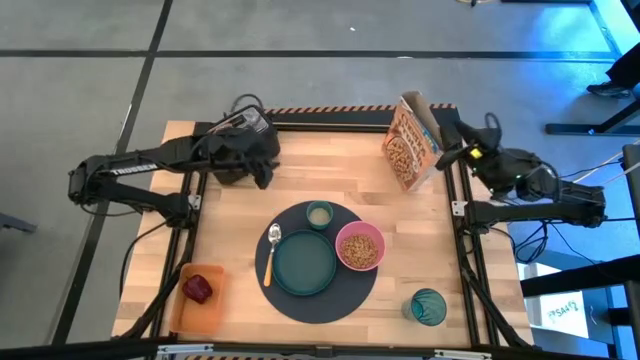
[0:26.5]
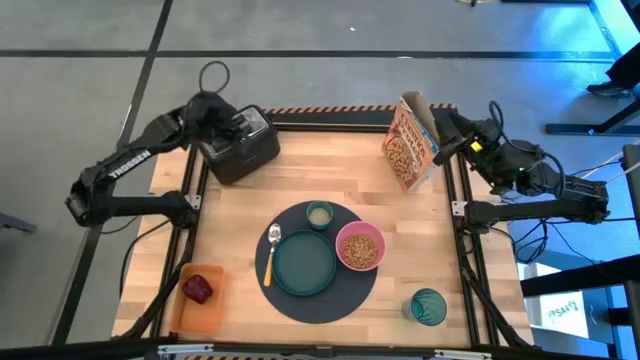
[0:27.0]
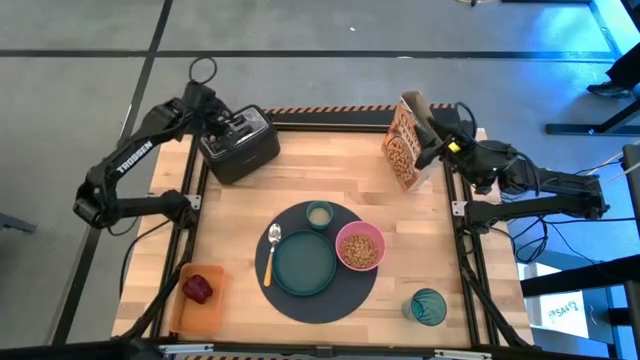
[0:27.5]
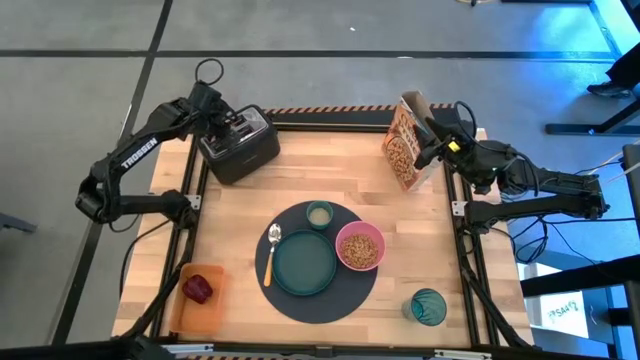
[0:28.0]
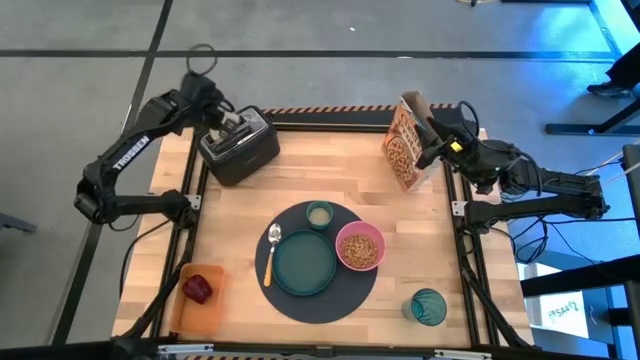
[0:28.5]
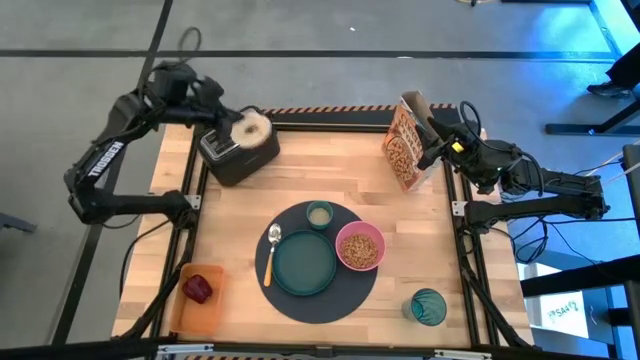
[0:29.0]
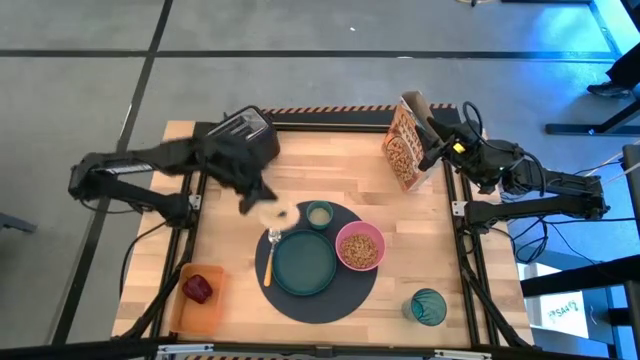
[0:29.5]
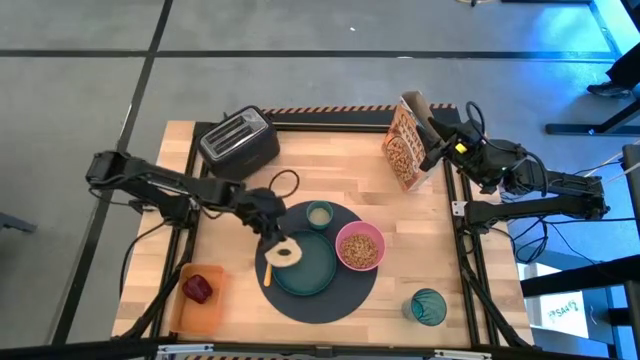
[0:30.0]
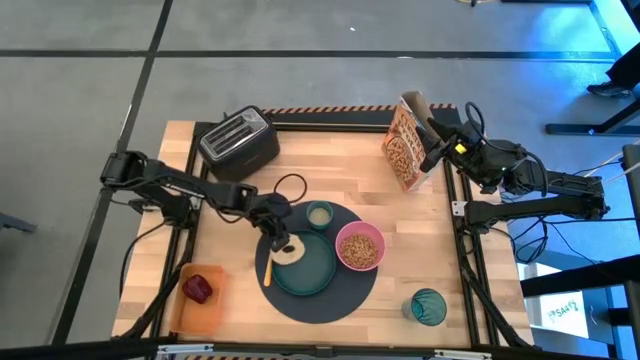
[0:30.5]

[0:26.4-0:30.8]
Task: Arrange a breakfast setting
Put the bagel on the dark green plate

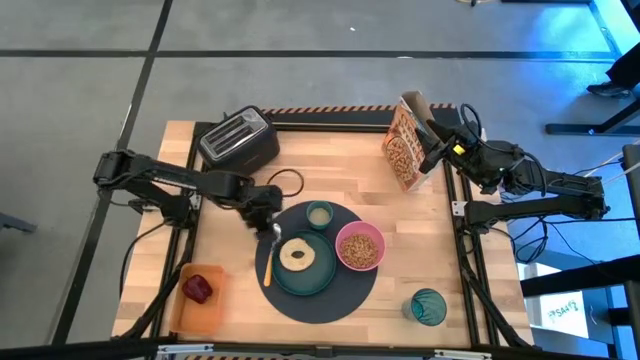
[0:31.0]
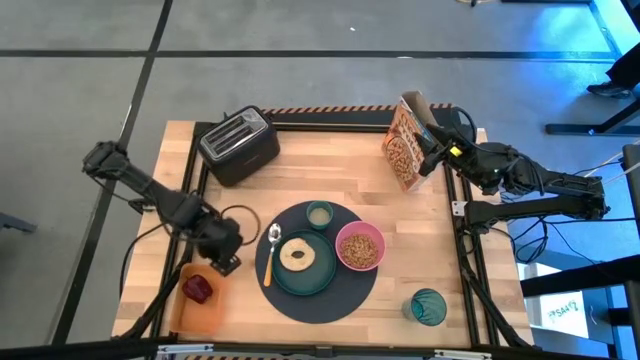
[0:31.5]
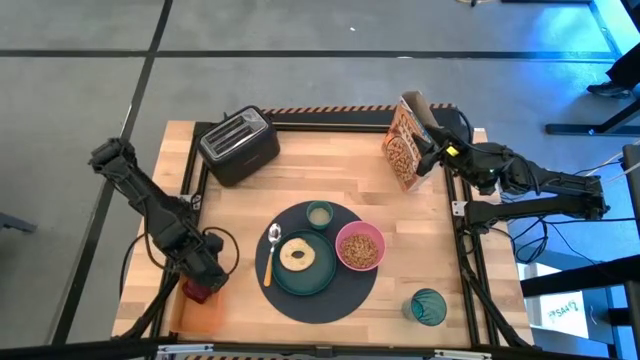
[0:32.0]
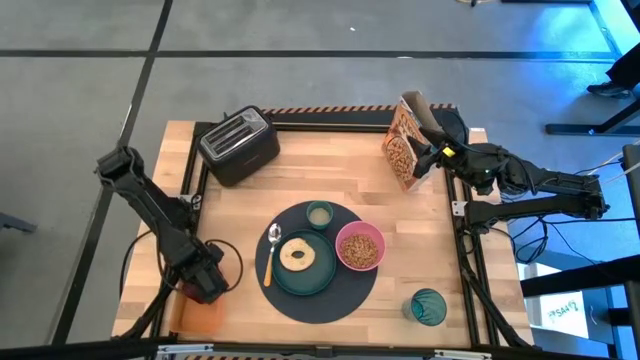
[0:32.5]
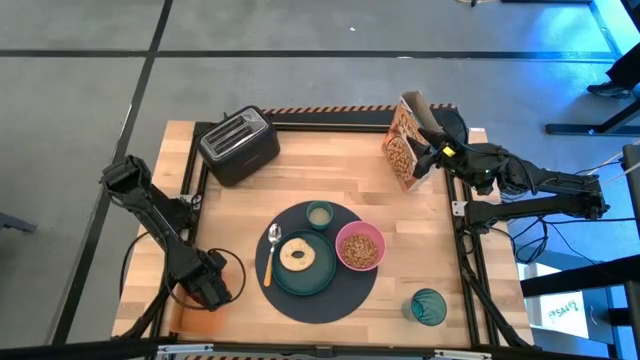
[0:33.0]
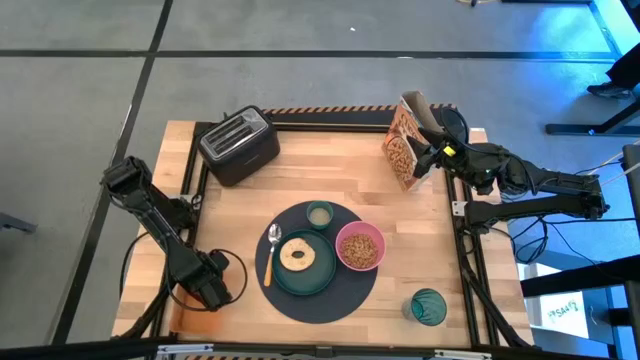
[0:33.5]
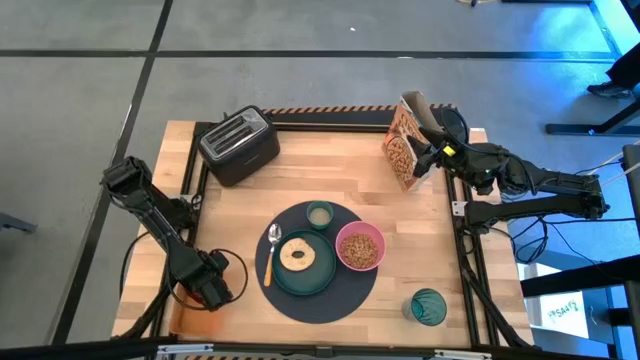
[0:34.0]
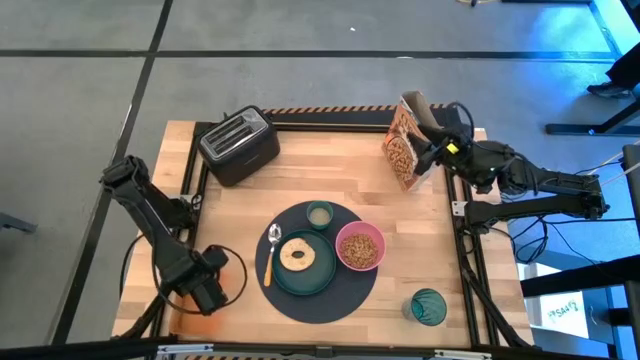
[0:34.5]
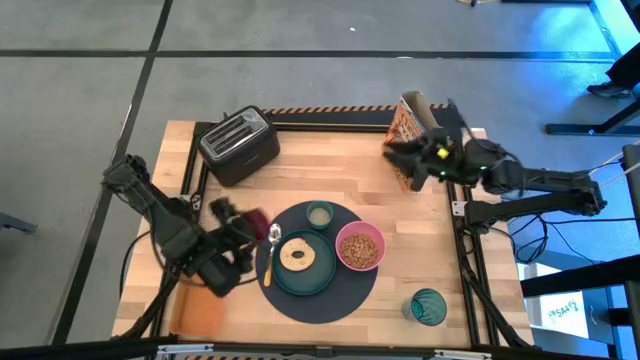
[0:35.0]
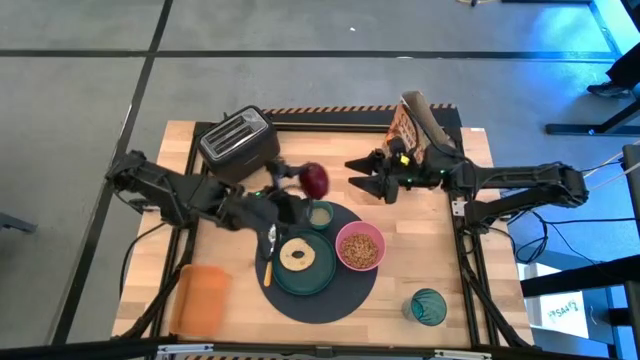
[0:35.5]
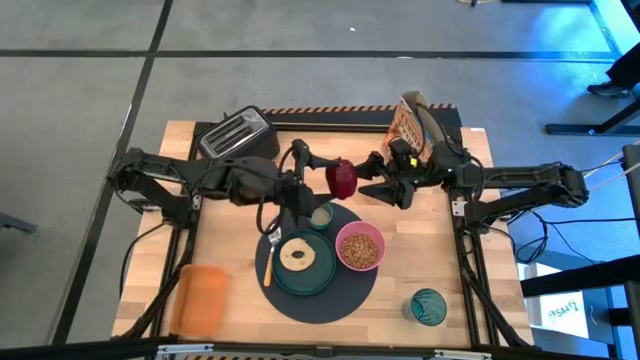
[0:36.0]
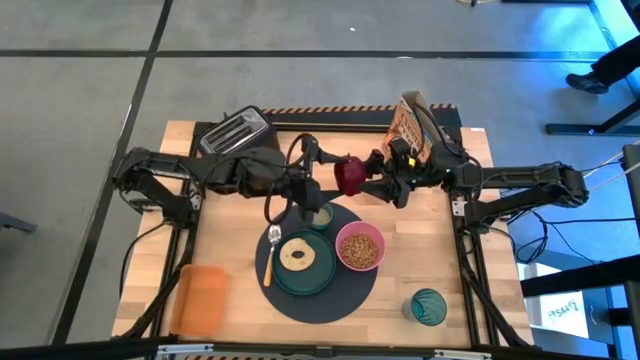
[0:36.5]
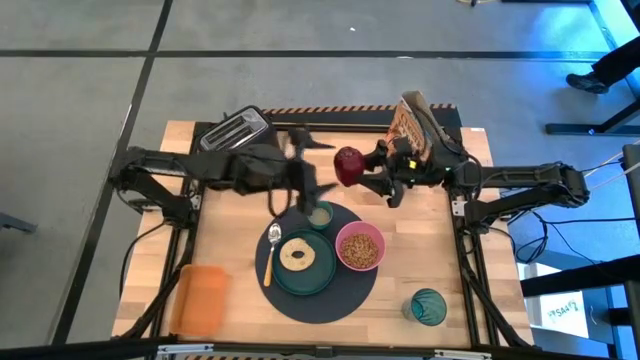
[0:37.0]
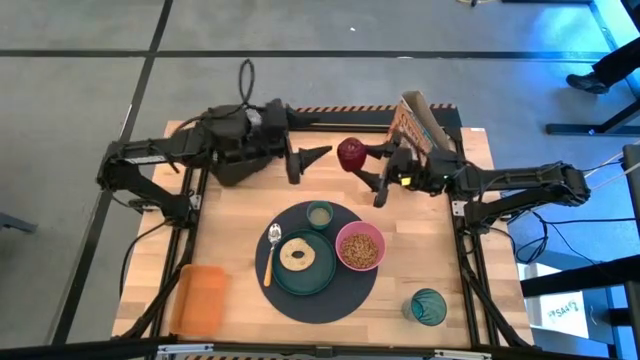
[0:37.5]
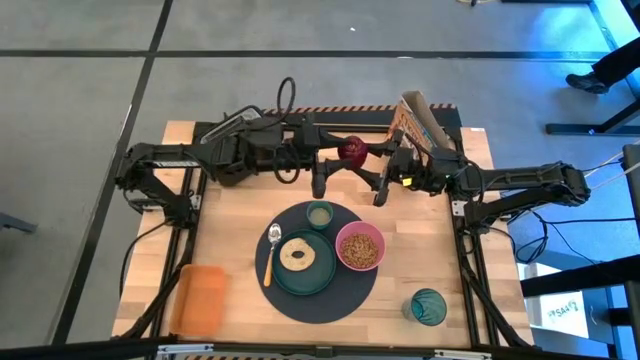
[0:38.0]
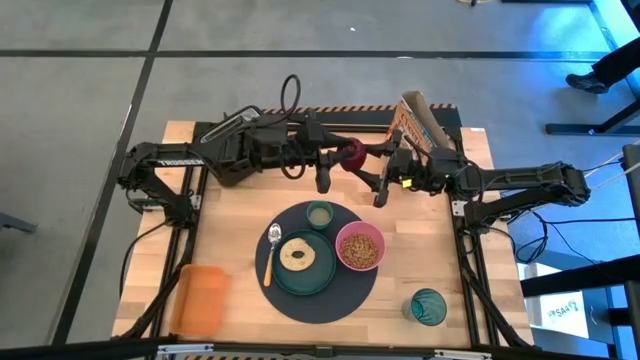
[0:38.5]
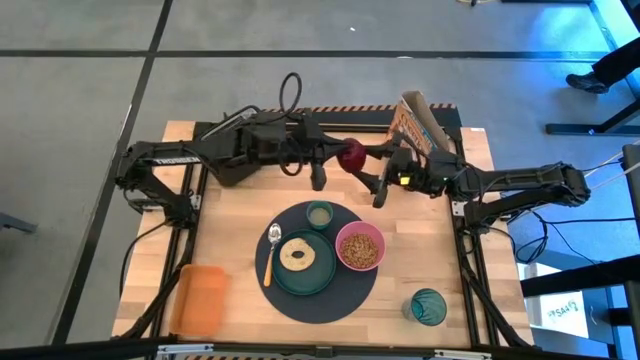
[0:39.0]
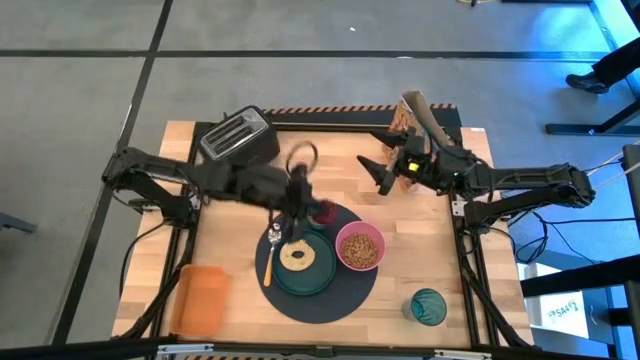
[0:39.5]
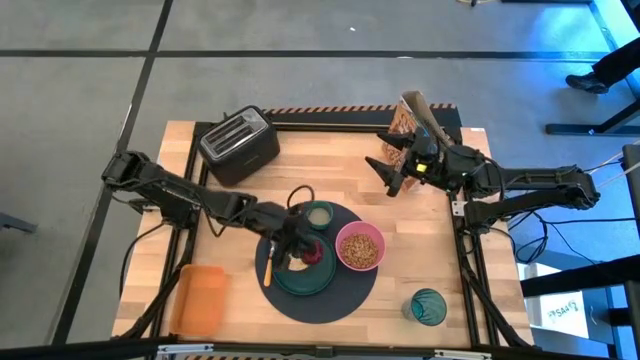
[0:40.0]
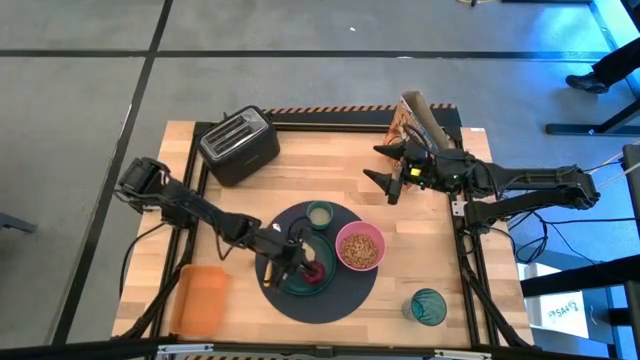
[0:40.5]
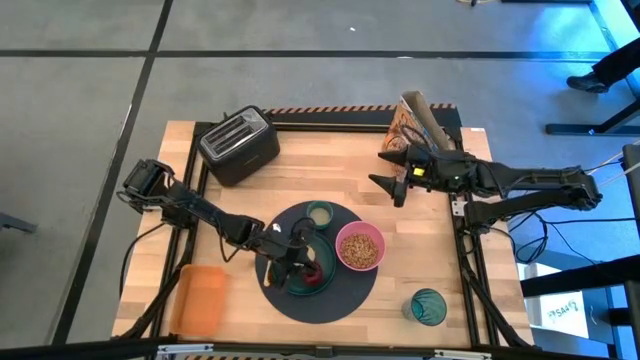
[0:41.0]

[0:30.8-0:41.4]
Put the apple on the dark green plate

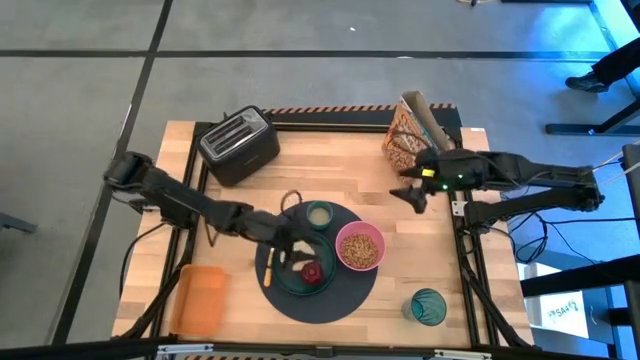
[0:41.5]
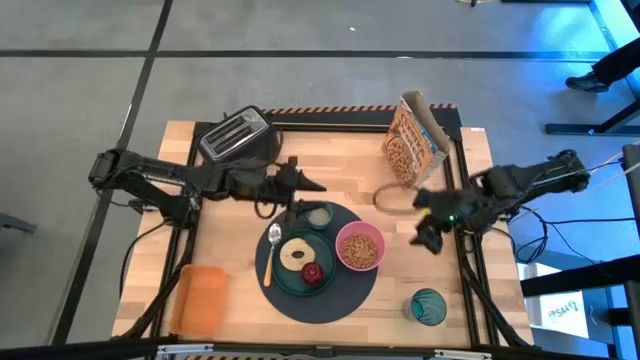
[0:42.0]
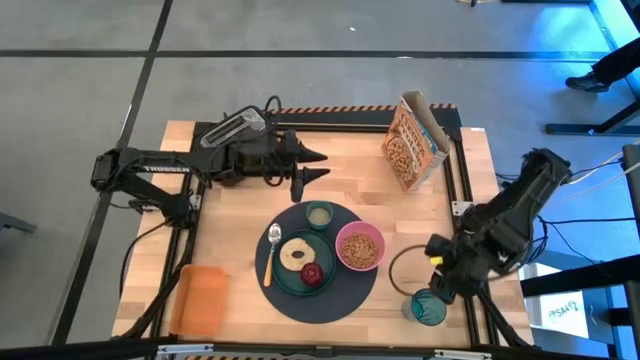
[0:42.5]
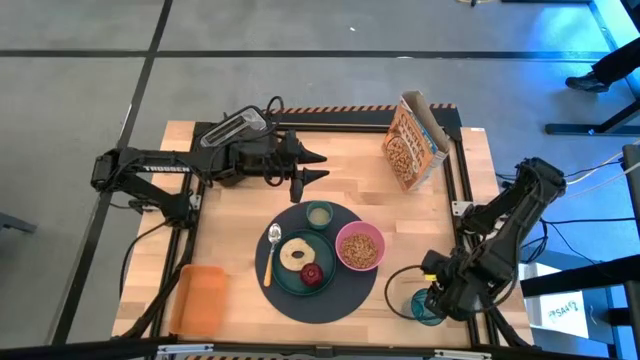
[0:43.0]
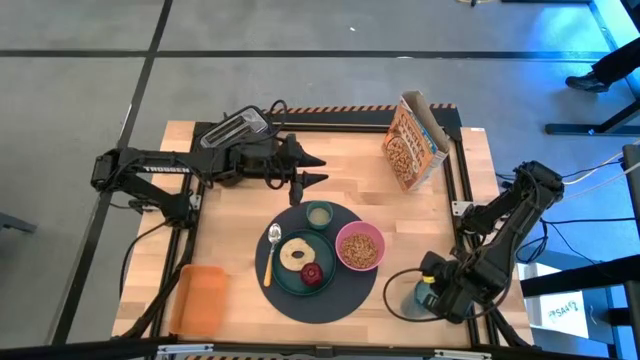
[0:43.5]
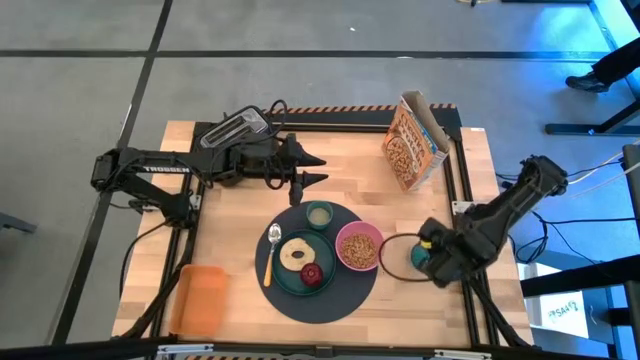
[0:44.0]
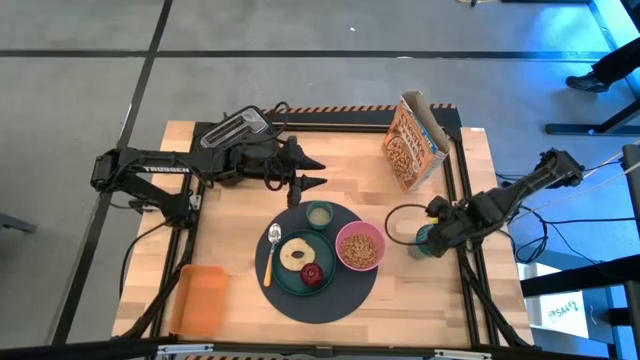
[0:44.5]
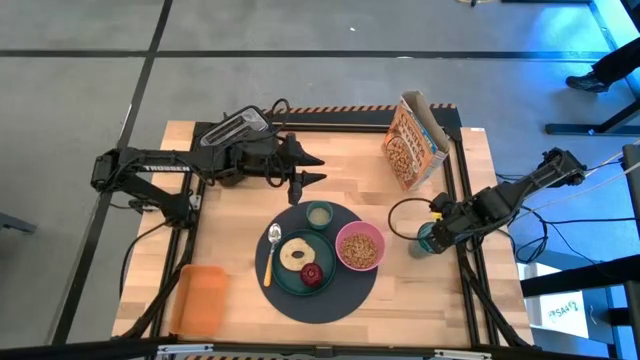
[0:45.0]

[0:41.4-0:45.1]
Move the blue glass to the middle left of the table

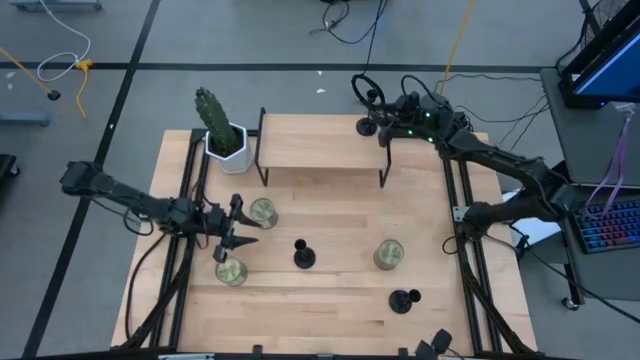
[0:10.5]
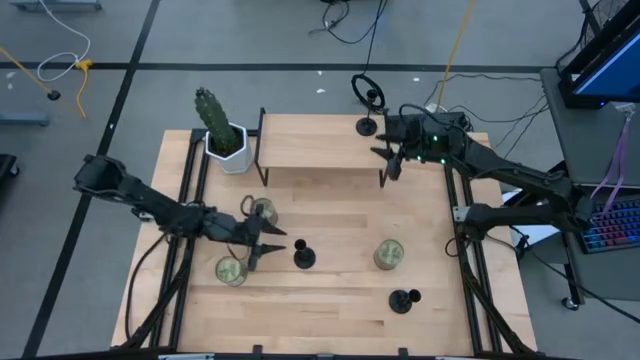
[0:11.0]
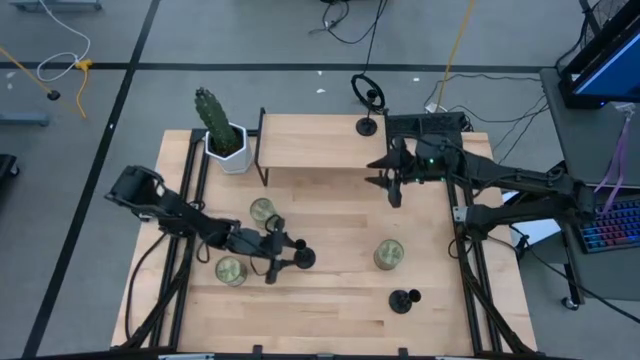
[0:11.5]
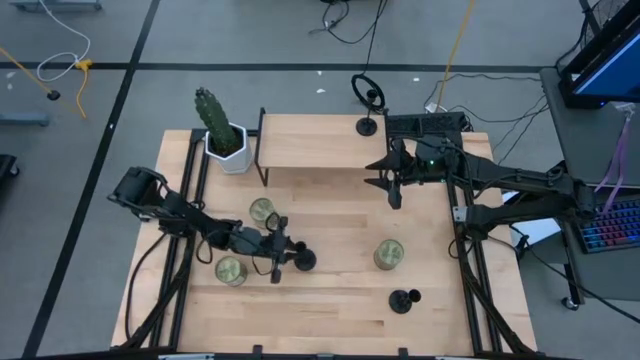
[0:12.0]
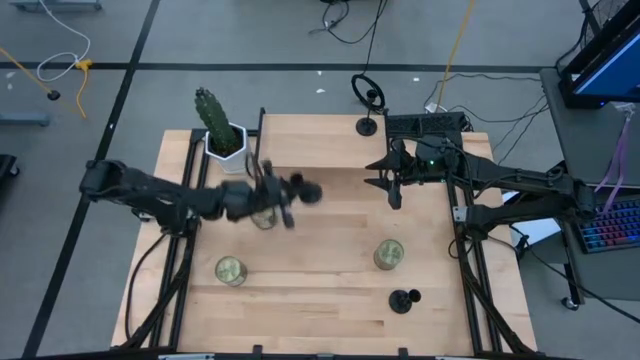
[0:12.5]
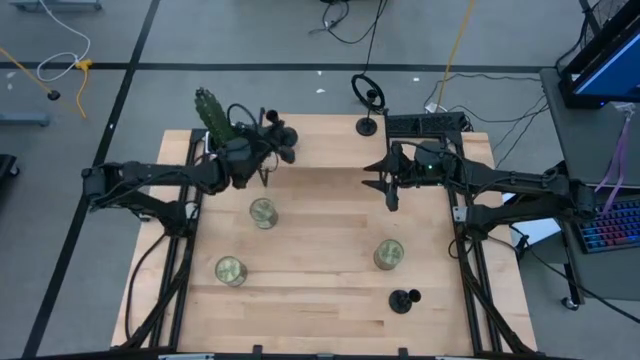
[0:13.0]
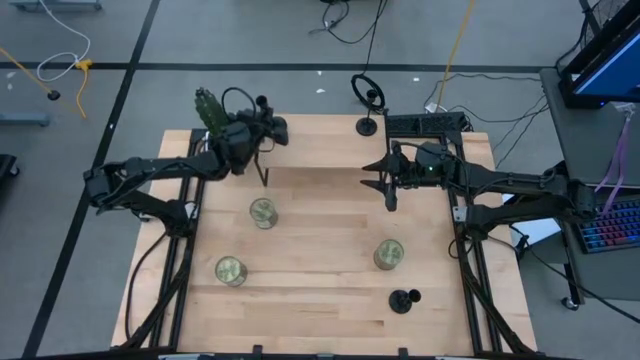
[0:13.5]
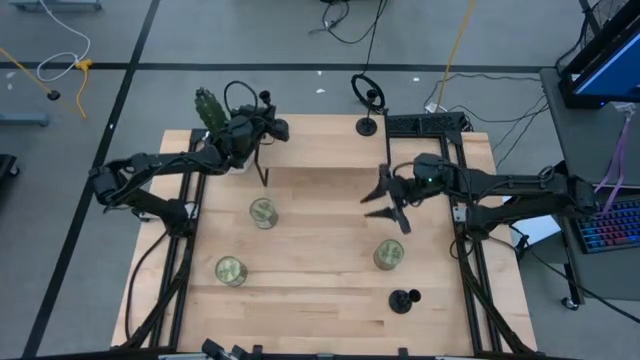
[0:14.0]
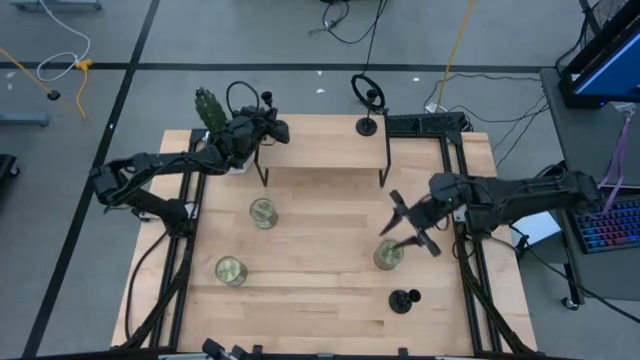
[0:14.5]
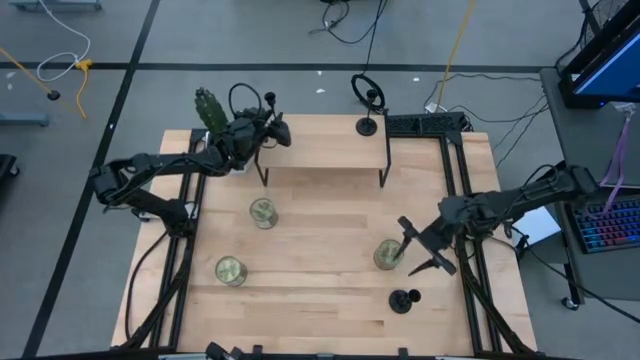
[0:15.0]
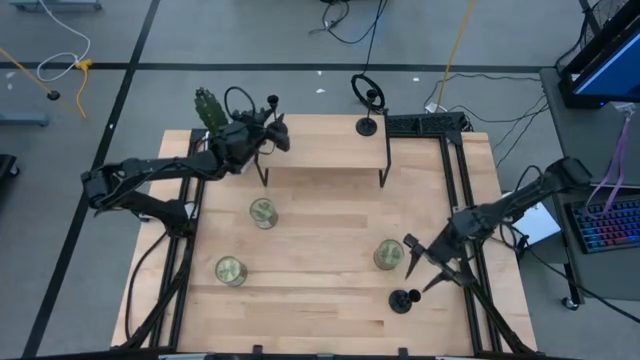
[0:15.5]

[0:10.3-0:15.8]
Task: Pick & Place candle stick holders
Put the top black candle holder on the shelf
